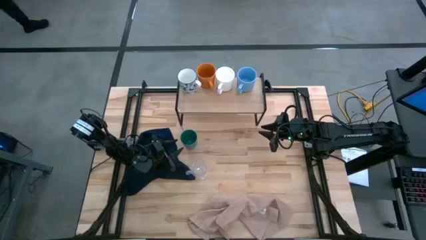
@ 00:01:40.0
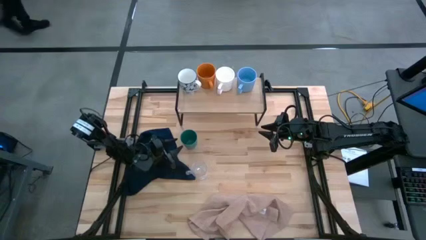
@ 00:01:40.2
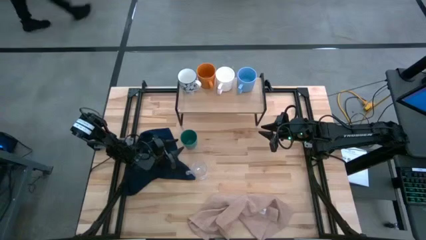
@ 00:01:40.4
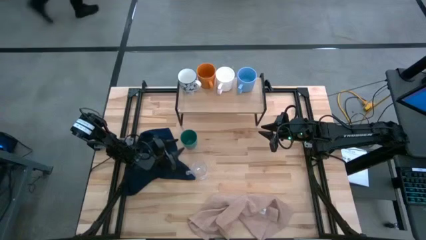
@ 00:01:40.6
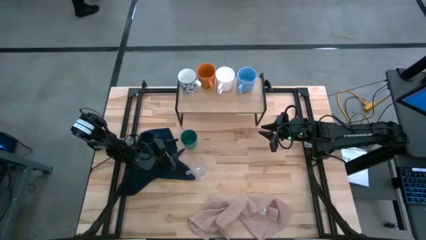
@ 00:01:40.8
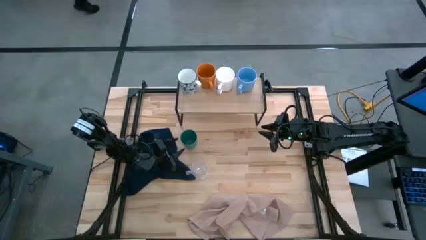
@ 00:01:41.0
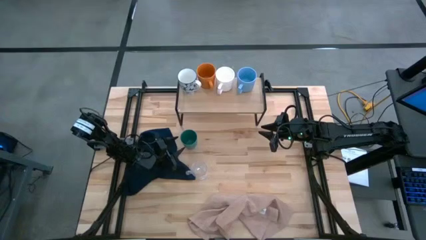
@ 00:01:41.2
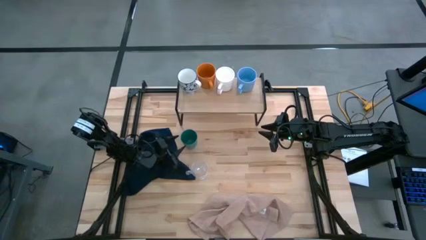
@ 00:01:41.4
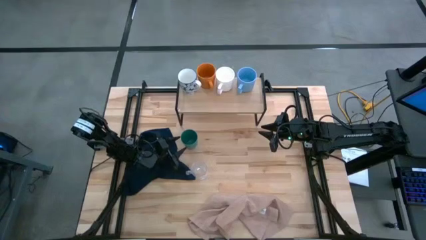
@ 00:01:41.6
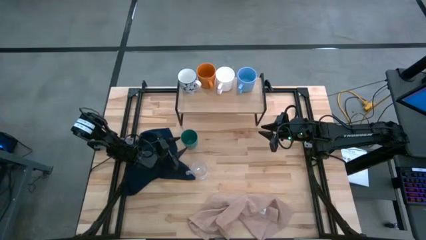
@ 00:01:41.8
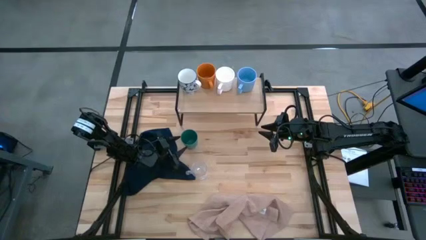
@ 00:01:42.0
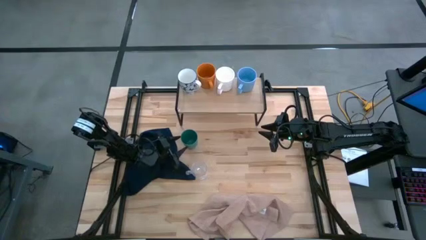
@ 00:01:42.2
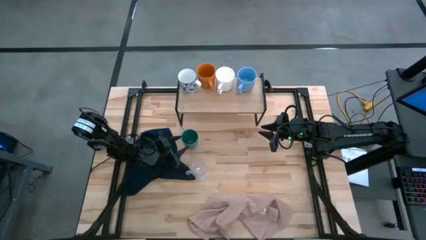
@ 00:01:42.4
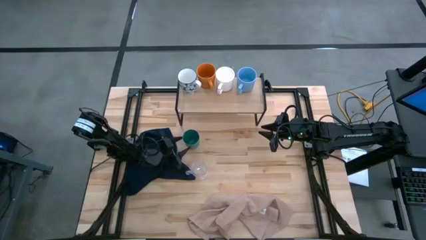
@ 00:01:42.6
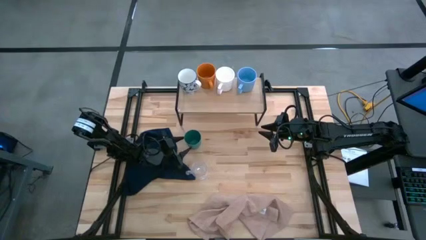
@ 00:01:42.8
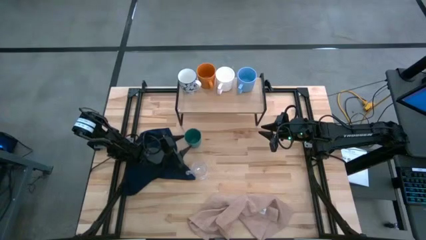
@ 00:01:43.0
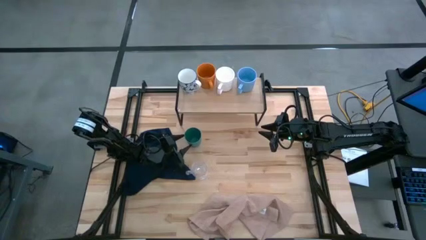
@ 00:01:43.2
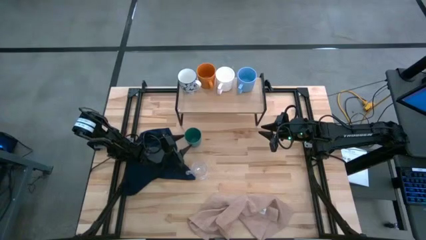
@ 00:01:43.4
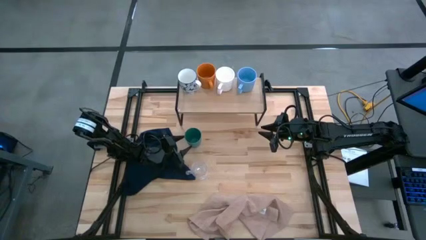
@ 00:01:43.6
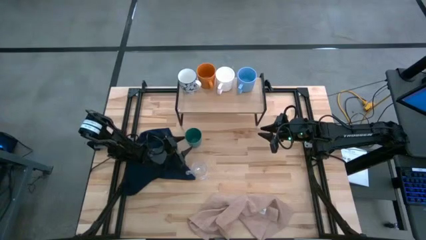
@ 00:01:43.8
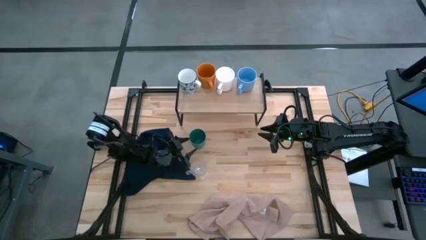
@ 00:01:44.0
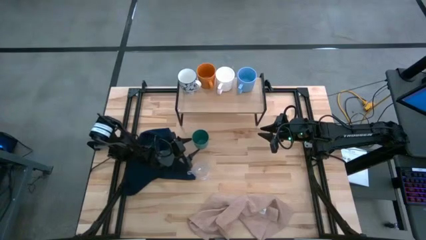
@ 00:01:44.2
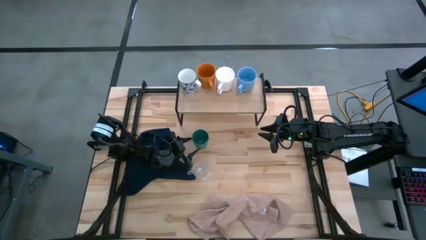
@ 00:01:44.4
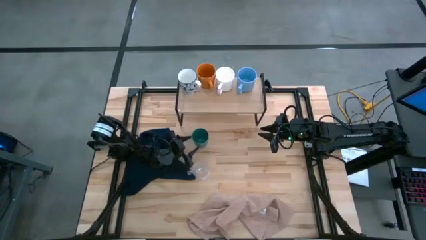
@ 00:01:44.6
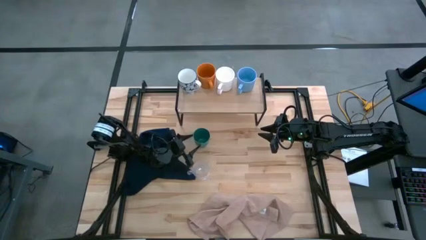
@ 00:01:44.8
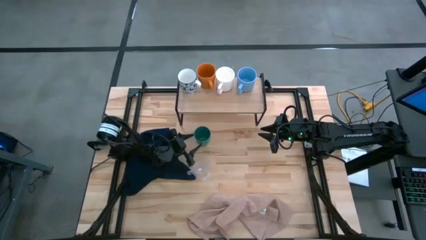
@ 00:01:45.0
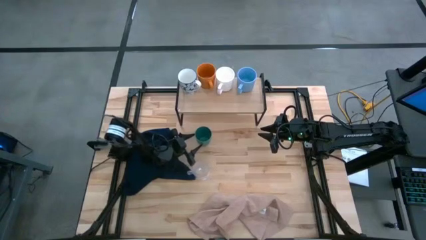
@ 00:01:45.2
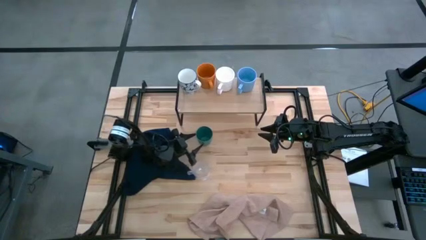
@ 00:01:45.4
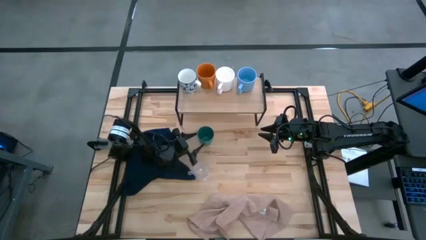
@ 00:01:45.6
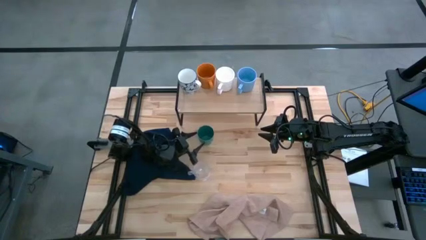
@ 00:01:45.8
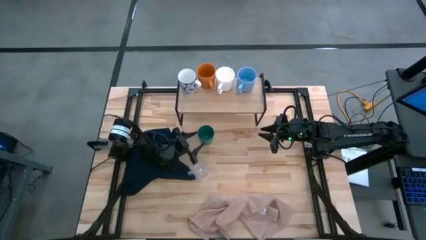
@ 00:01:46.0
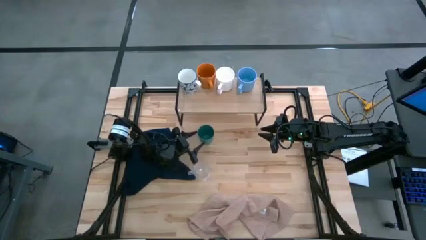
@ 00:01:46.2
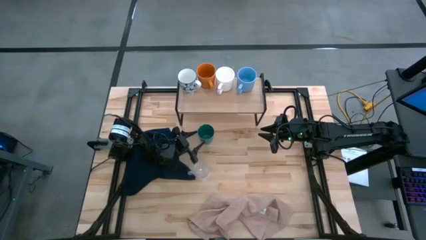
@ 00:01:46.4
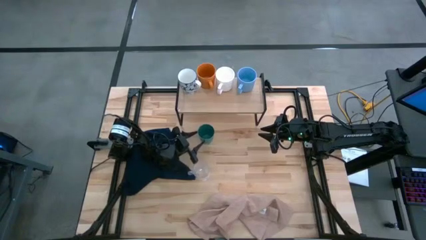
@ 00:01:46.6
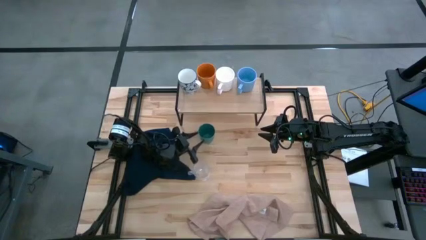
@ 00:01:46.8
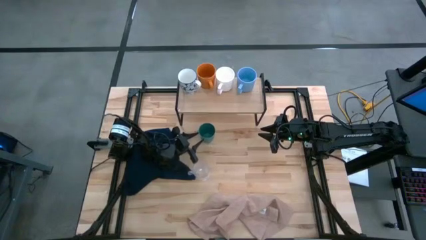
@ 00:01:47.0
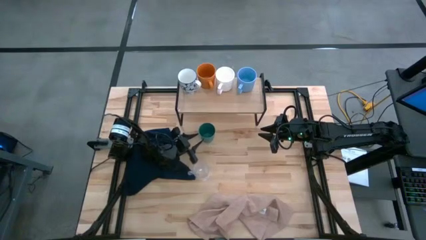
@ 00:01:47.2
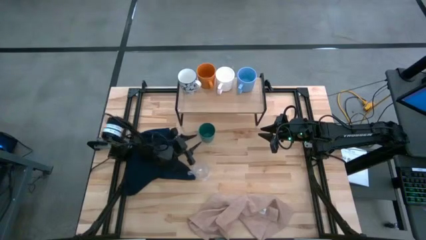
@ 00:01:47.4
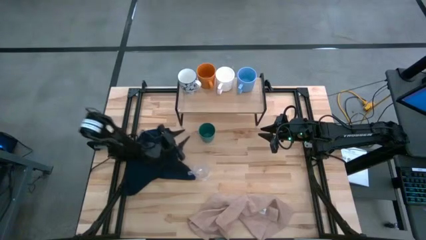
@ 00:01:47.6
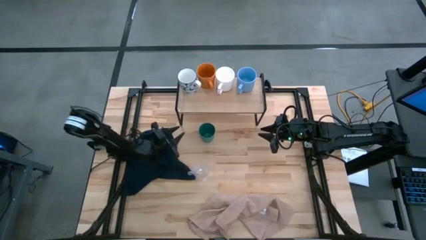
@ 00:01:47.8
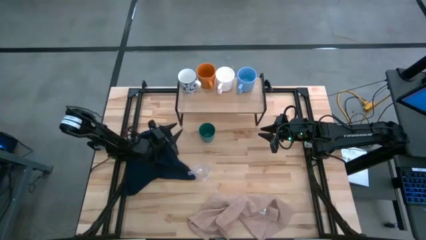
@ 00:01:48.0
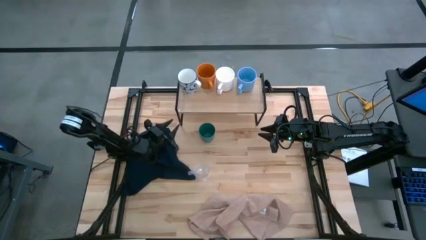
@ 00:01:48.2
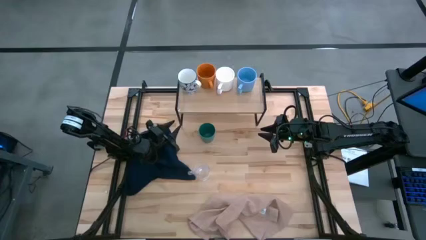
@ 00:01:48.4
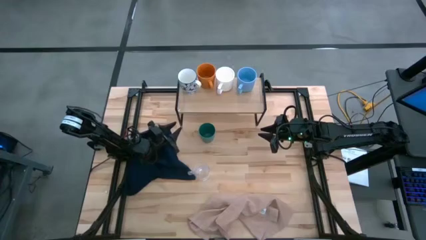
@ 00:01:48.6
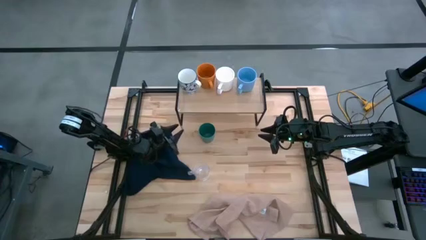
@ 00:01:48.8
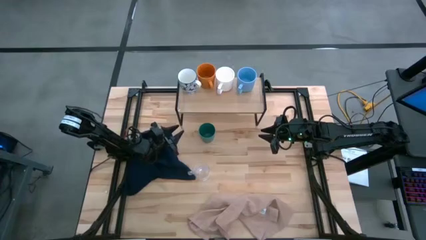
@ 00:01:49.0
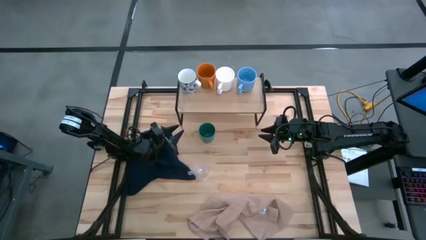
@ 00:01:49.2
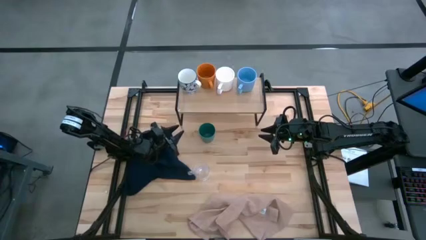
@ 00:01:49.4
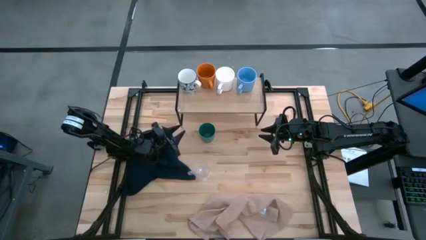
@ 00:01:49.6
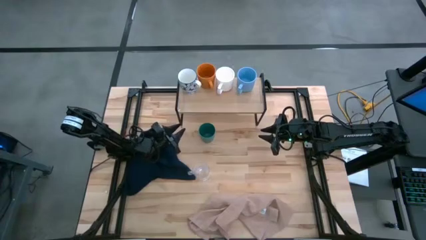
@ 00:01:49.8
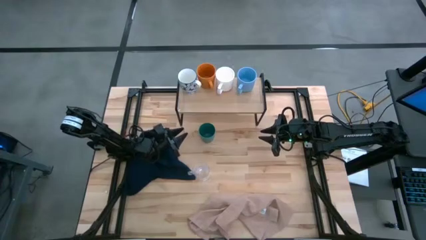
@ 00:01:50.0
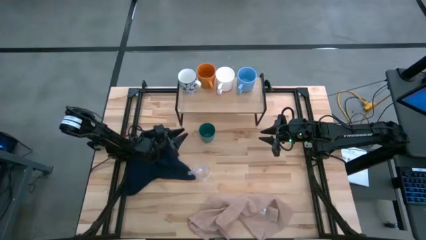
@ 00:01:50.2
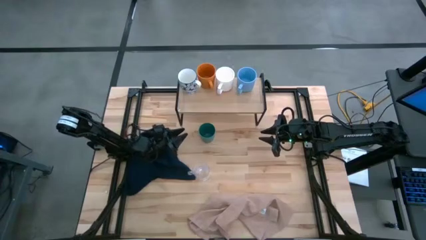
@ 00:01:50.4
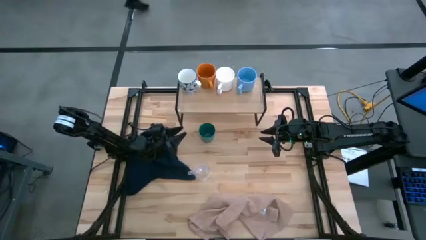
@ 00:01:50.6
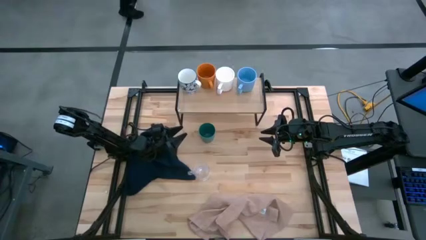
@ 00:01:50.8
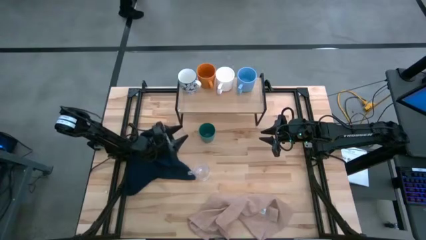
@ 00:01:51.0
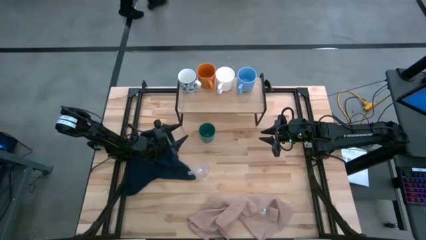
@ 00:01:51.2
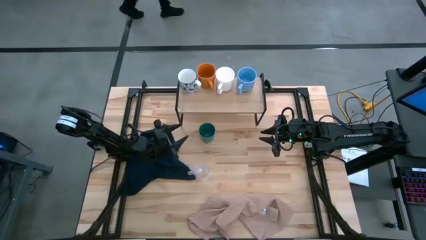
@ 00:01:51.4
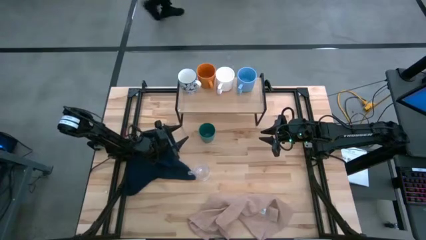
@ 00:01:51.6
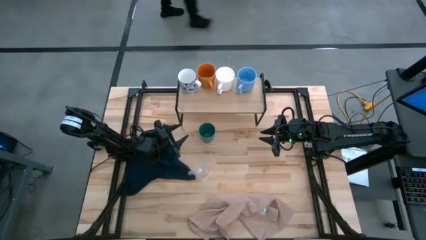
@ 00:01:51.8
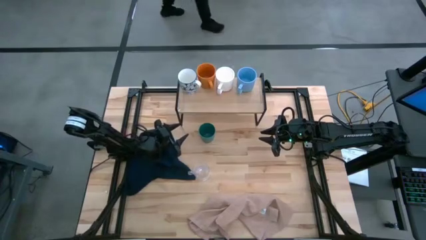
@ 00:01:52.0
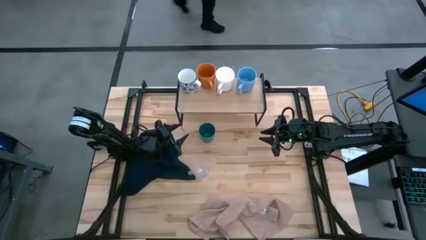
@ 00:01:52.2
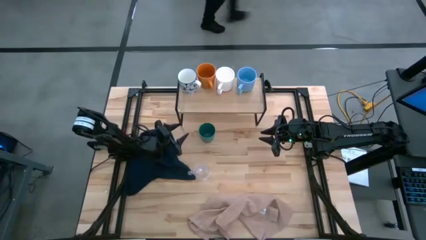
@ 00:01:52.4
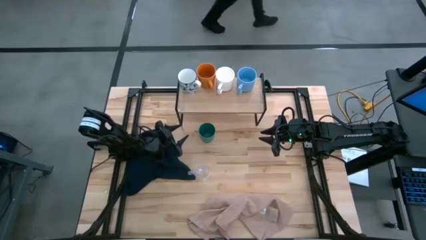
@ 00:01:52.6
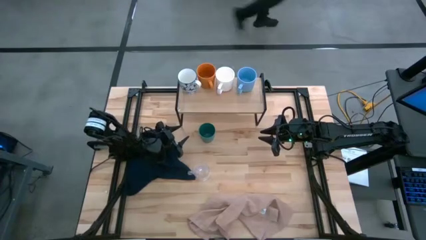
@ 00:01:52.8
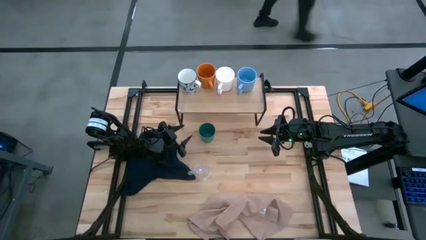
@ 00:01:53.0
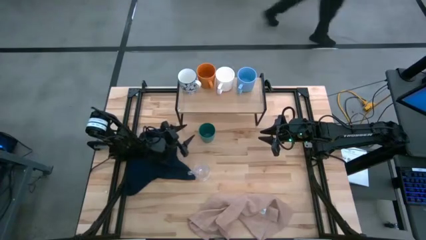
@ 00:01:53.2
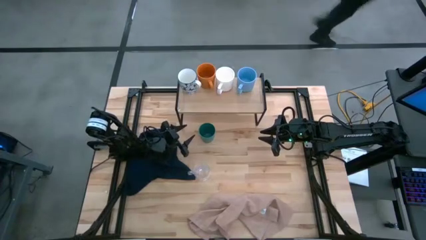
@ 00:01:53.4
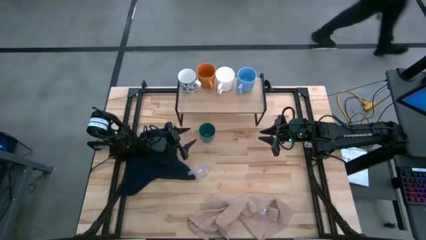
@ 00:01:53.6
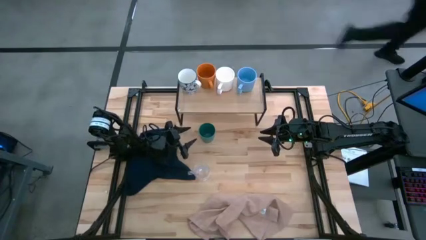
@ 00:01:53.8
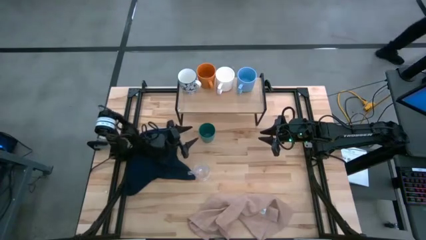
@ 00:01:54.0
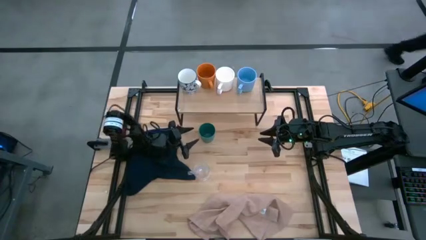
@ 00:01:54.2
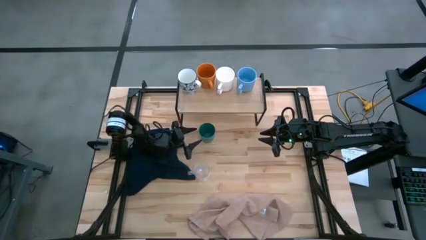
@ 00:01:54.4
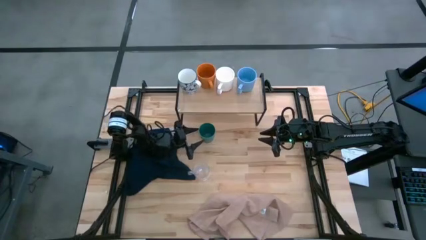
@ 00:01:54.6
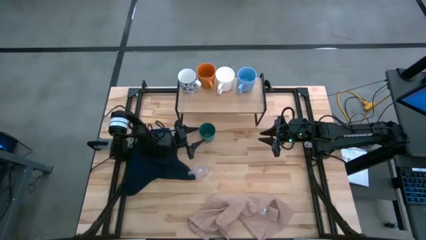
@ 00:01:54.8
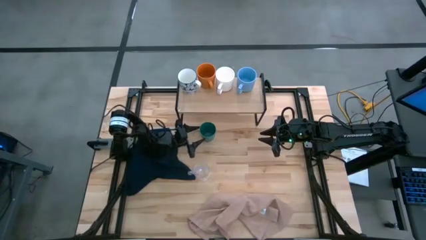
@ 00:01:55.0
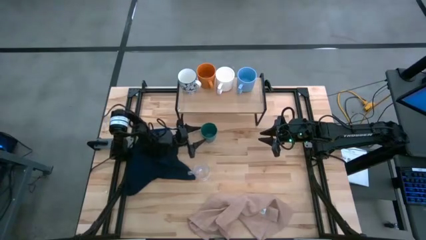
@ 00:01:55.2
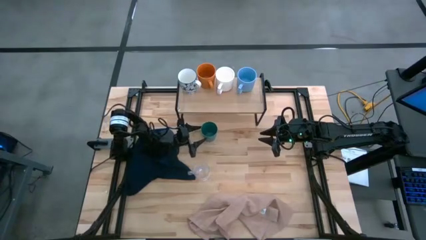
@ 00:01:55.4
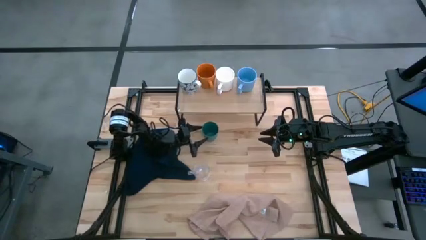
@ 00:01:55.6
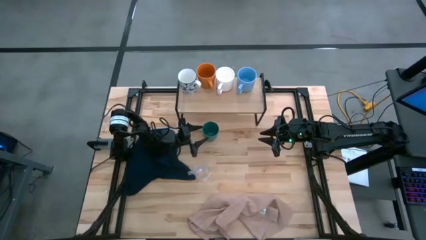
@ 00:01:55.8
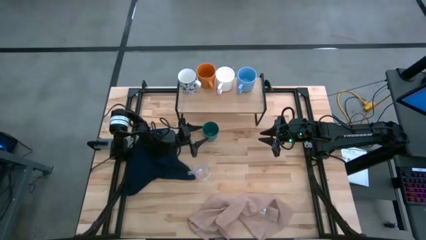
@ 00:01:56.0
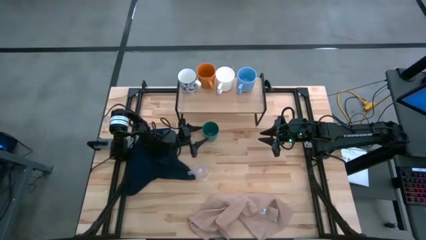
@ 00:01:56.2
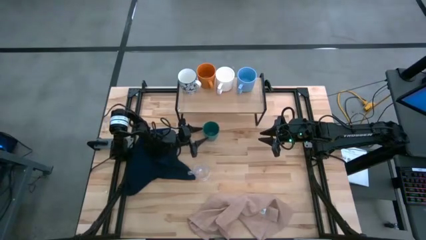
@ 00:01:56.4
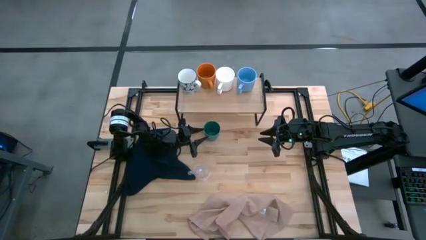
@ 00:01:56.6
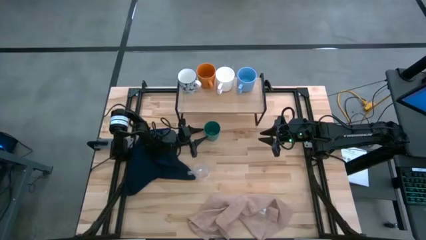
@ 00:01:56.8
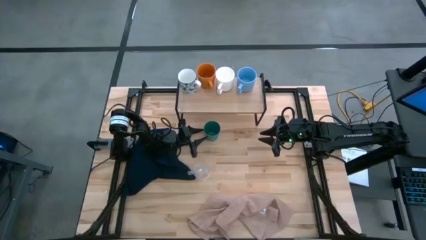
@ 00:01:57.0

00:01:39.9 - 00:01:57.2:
Task: Stack small to large cups/mugs on shelf
Put the green cup on the shelf
